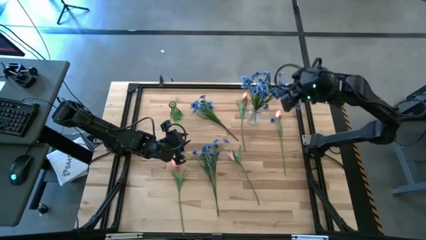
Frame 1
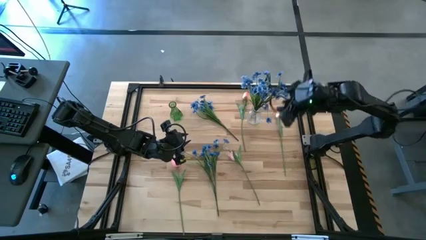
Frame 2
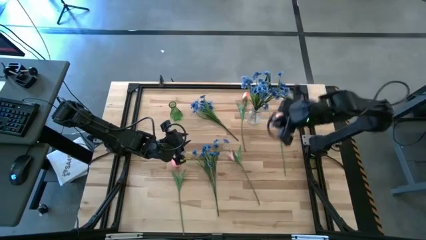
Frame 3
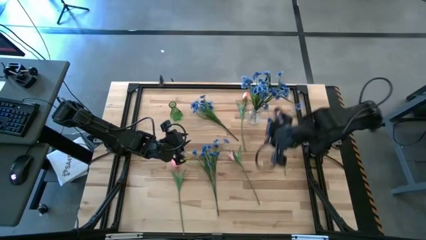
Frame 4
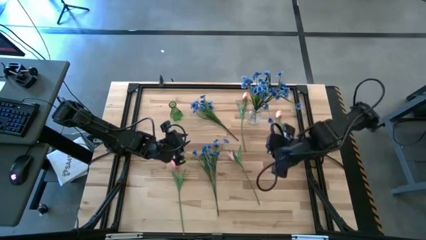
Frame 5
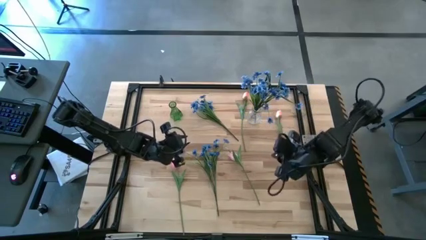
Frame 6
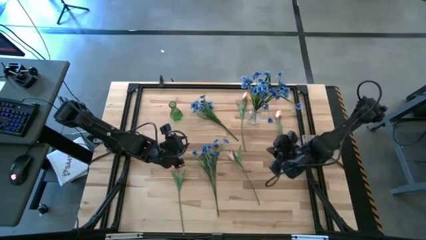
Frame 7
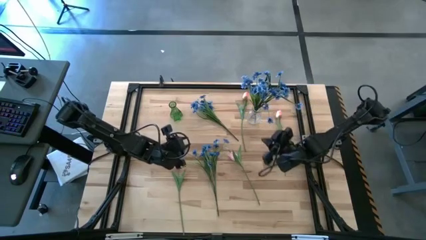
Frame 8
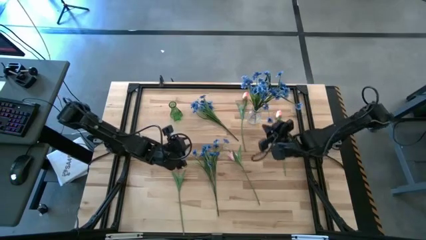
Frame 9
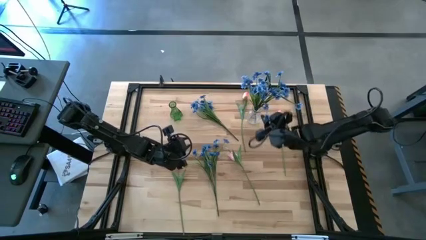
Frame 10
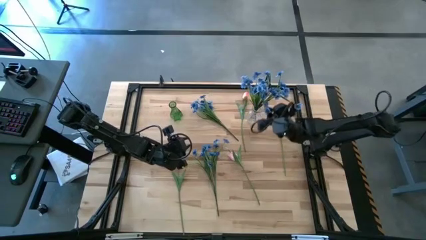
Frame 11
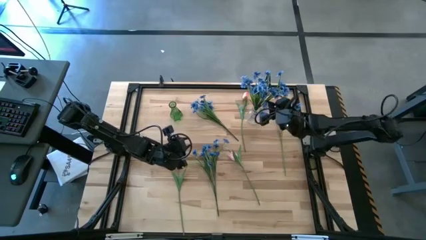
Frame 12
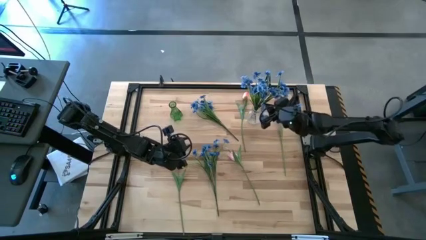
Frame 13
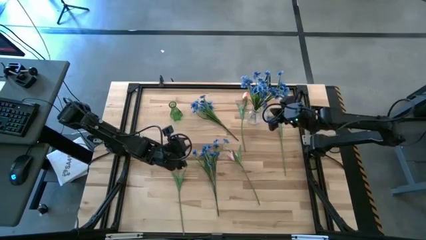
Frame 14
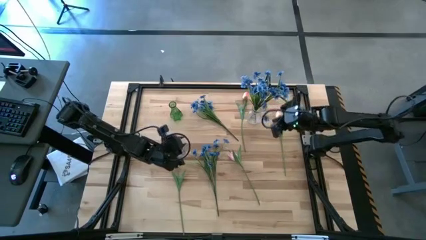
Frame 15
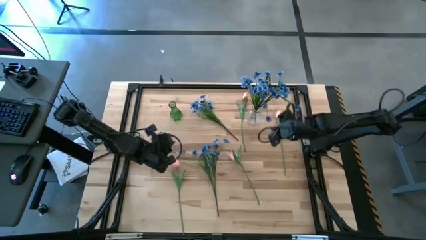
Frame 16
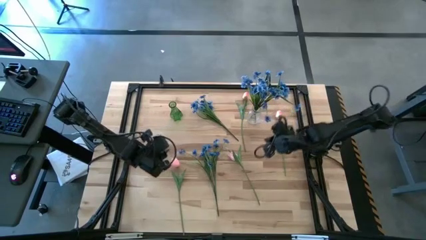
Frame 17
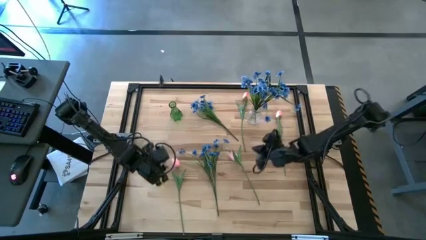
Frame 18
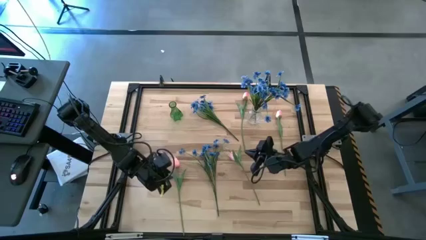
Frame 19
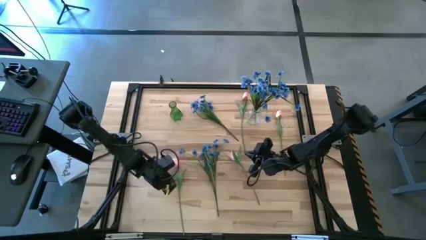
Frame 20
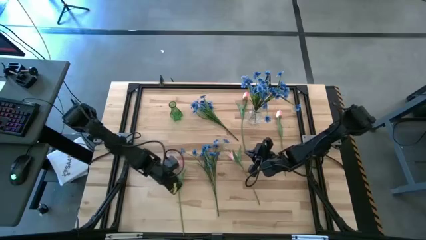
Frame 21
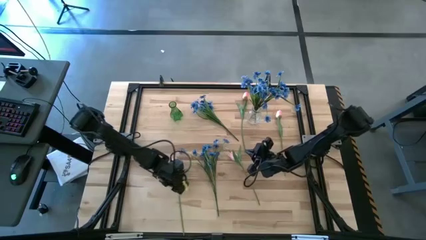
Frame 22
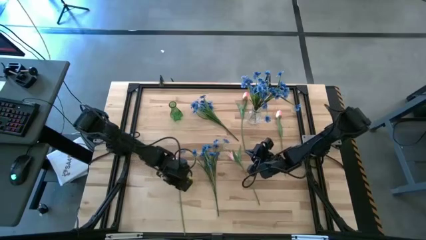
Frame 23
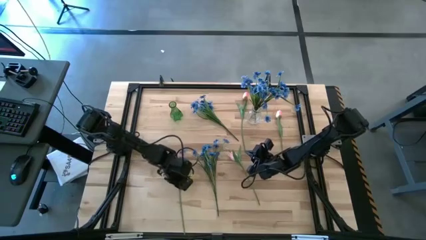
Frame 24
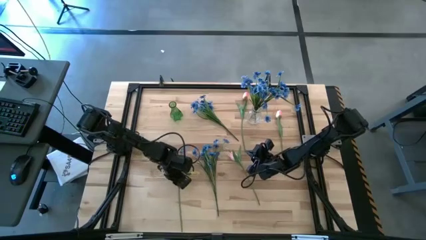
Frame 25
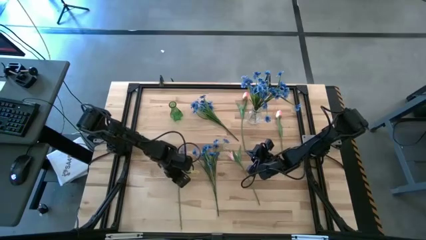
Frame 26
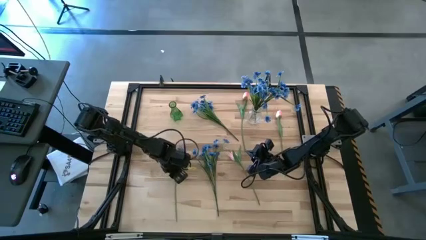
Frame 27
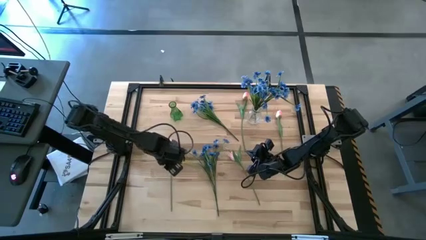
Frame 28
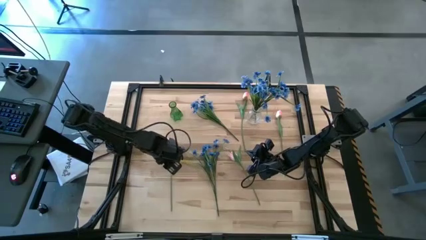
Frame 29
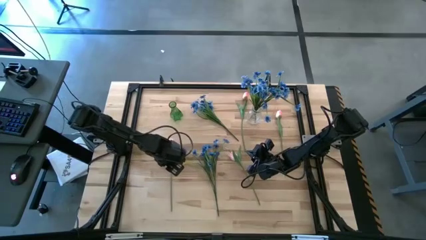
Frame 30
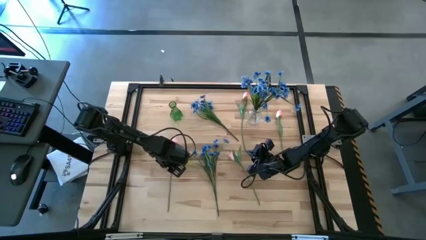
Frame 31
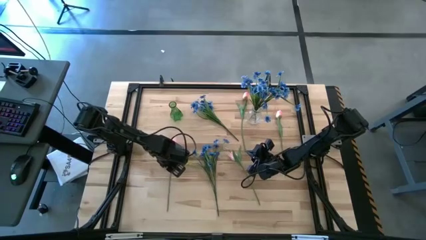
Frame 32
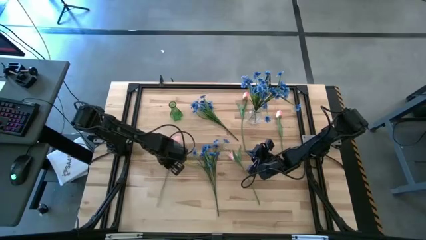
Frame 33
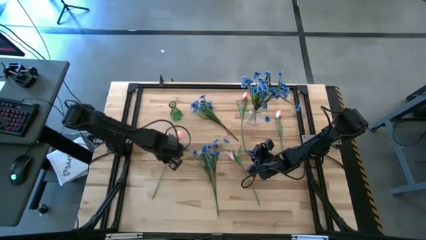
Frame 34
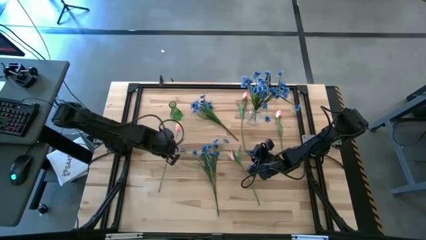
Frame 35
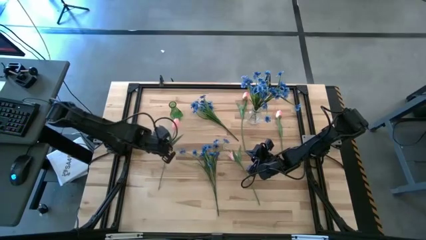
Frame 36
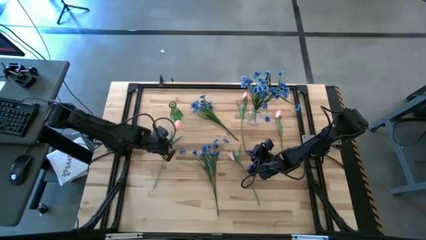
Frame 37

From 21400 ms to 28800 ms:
Task: Sort flowers into vase by color
Put the bottom left pink tulip into the green vase

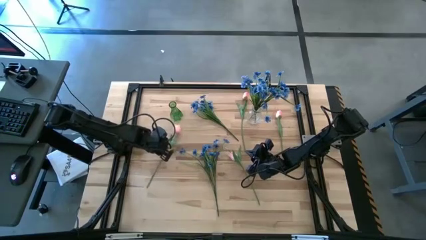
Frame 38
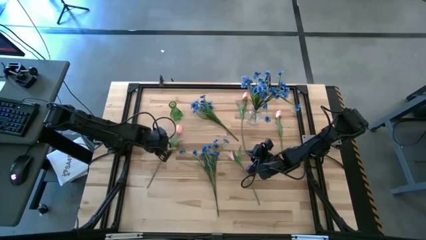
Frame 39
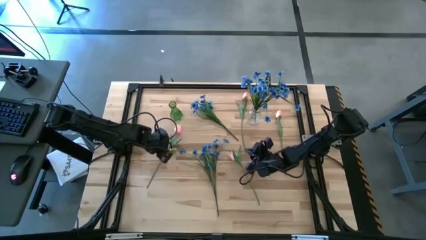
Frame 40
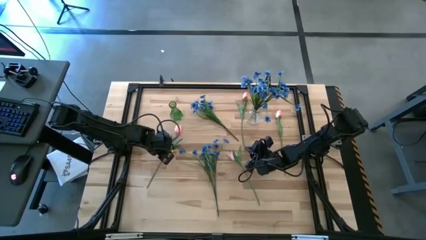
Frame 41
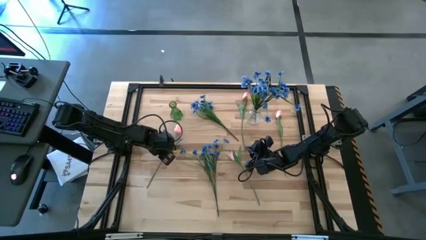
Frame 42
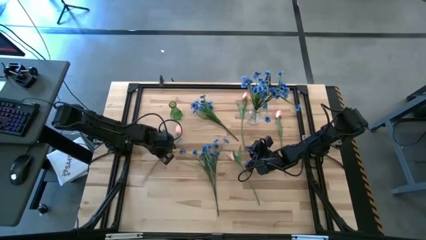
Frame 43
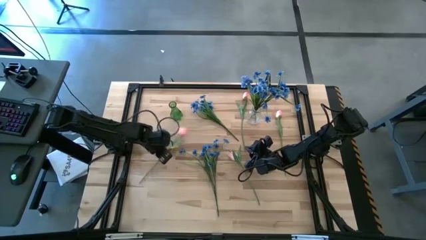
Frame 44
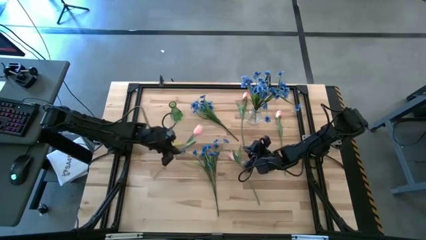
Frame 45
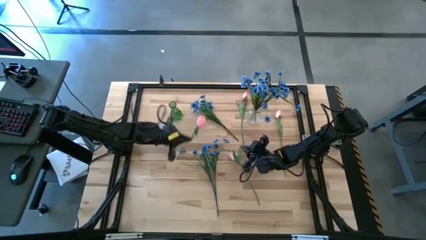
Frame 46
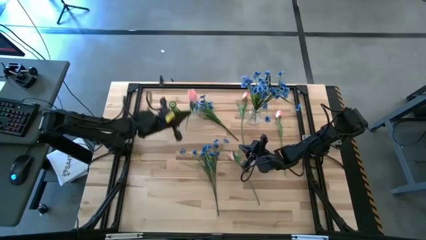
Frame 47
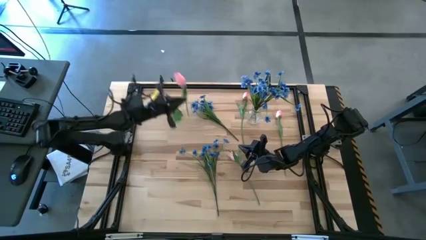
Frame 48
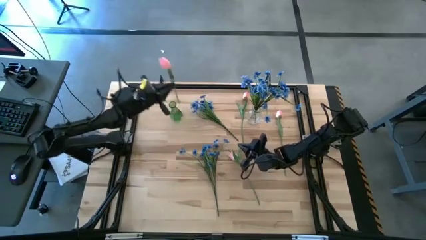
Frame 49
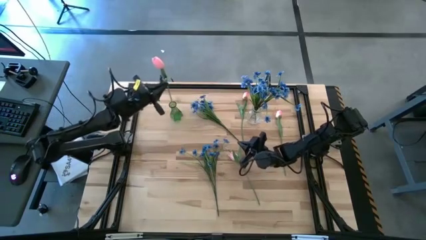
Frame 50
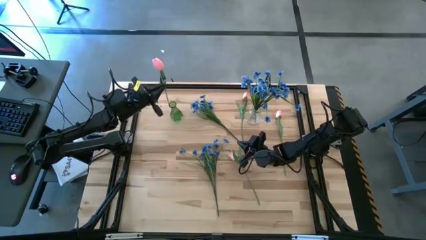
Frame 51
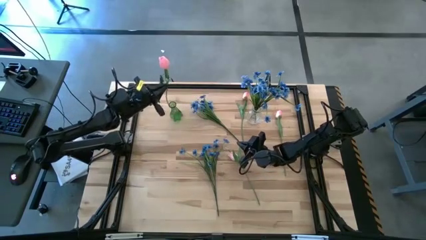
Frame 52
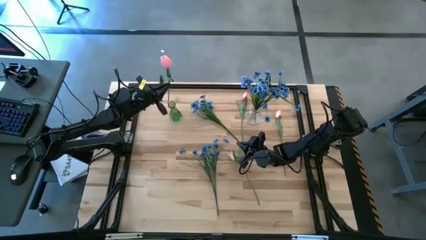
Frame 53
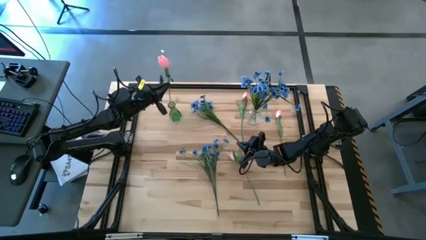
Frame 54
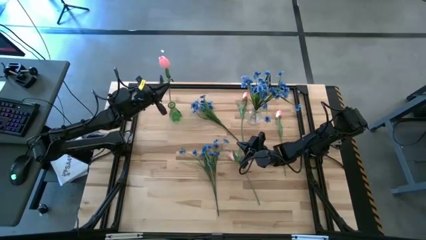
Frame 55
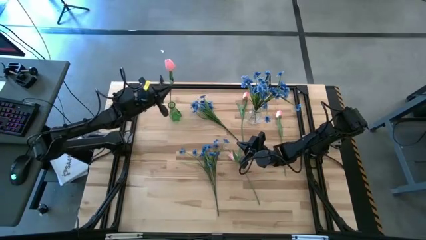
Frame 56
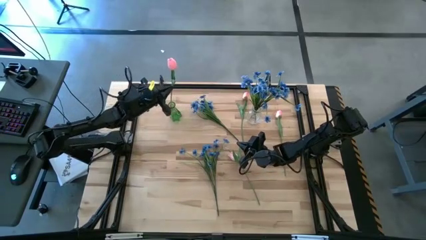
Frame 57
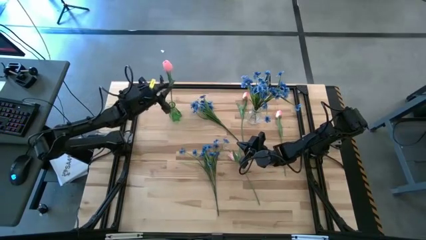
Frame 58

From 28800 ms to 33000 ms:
Put the bottom left pink tulip into the green vase

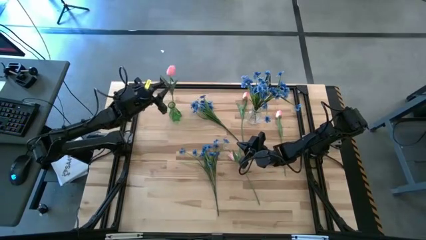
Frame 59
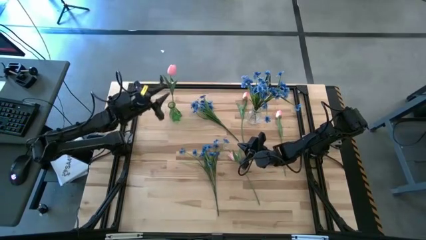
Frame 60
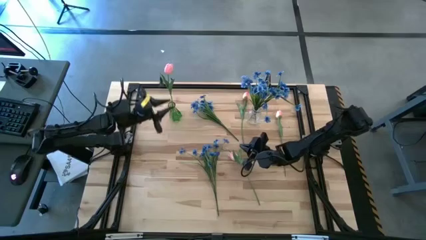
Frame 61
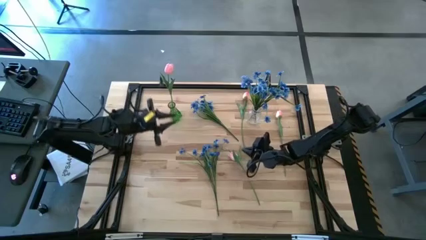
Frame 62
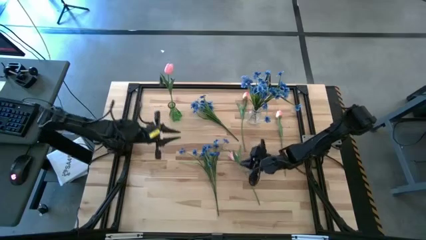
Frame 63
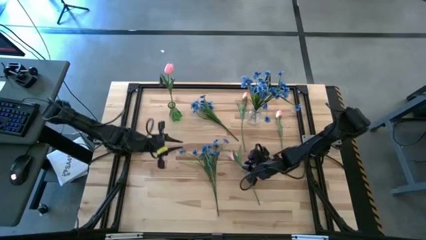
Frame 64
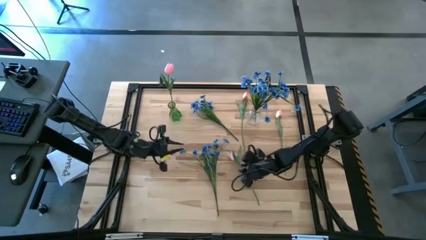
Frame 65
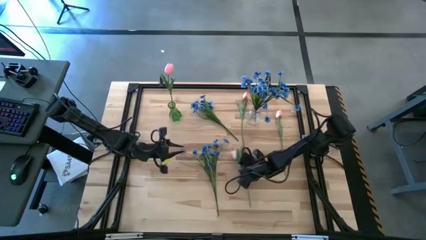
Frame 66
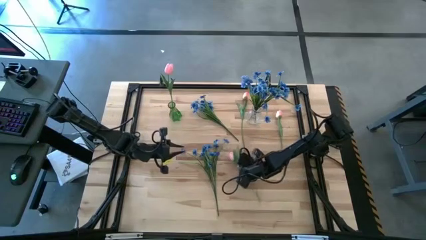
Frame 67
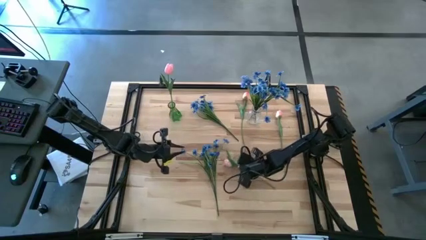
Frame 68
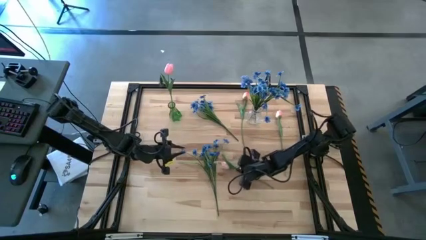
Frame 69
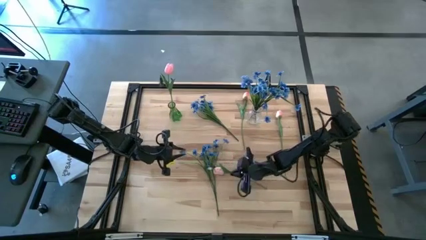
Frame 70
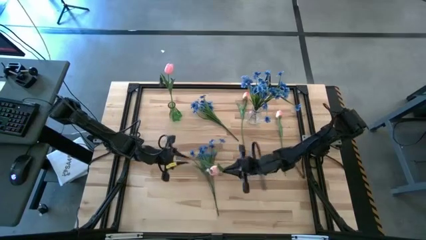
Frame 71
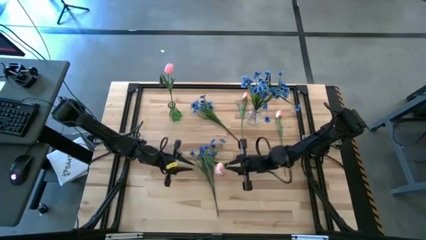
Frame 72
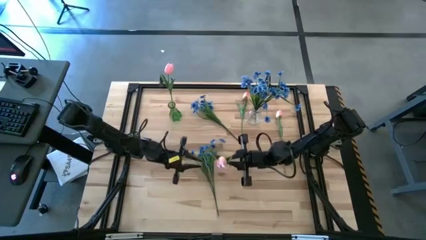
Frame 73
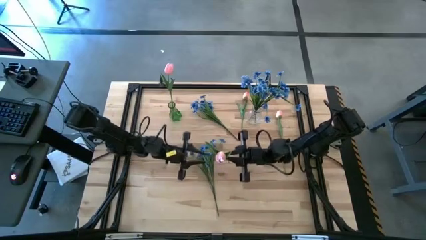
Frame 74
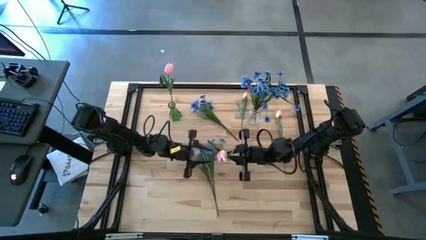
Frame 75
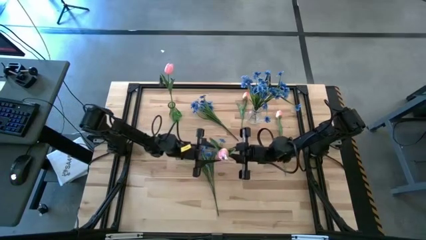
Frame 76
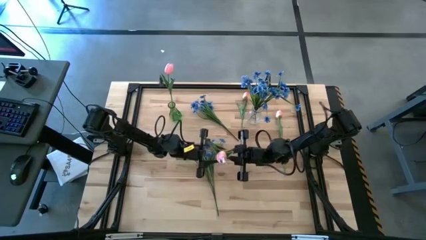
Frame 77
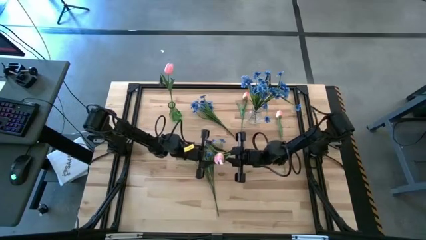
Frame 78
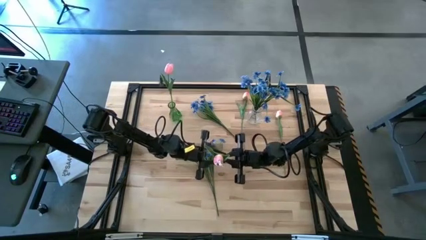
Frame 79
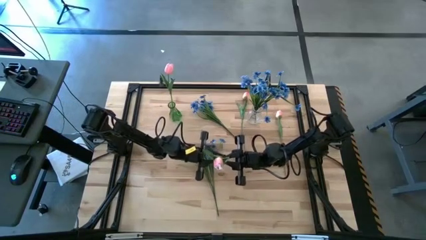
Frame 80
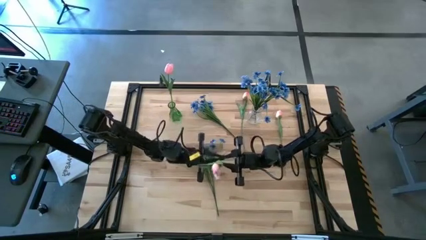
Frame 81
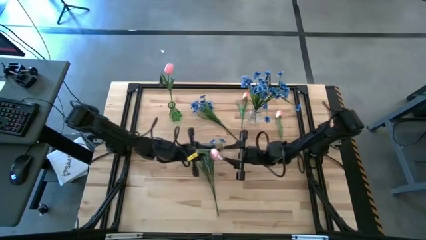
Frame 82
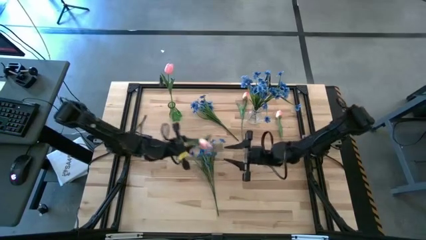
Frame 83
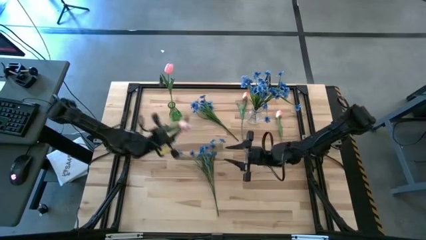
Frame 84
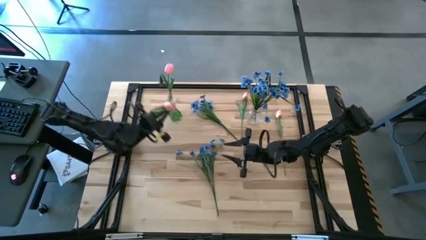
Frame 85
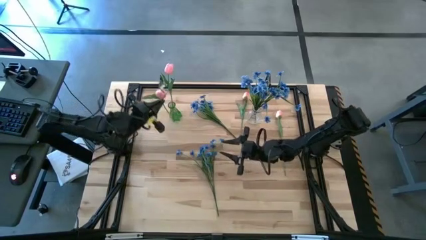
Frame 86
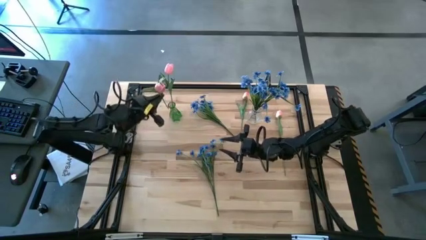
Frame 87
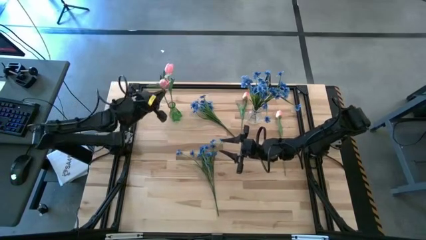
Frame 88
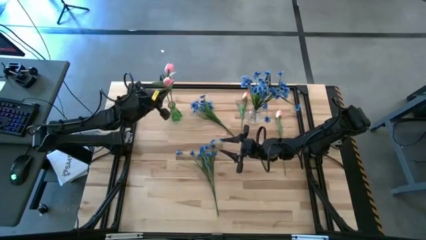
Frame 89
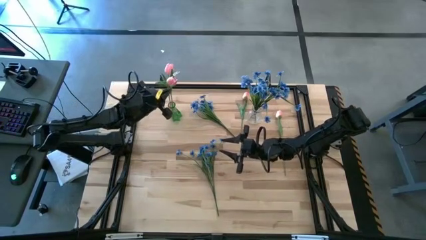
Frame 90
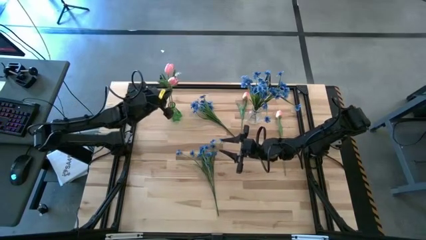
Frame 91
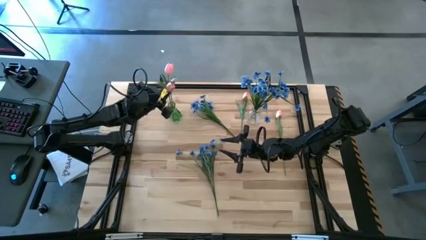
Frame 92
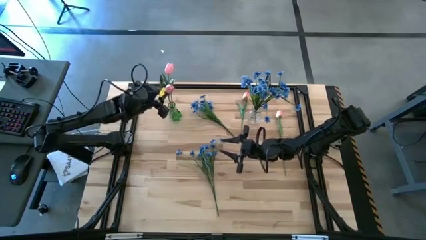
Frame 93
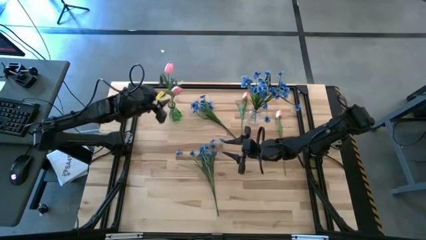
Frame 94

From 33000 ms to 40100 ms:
Put the bottom left pink tulip into the green vase
